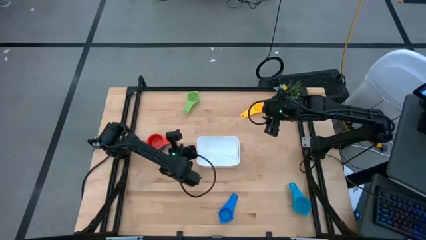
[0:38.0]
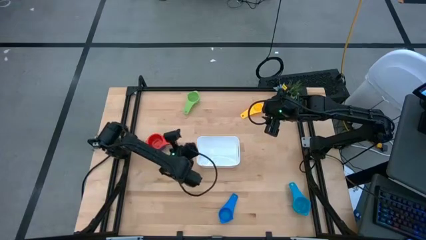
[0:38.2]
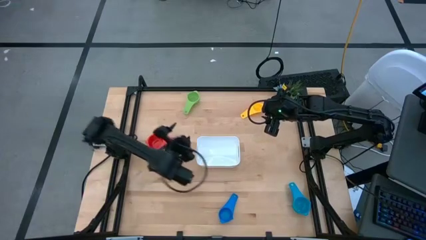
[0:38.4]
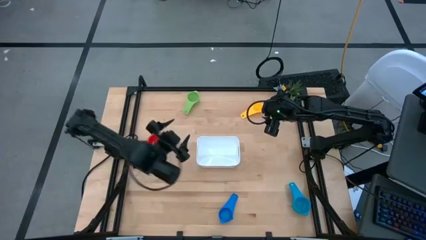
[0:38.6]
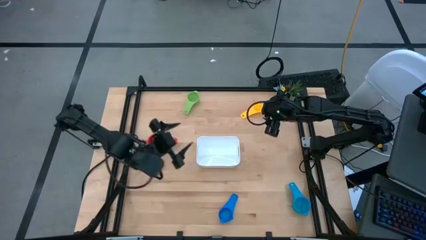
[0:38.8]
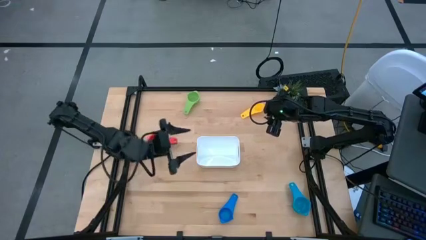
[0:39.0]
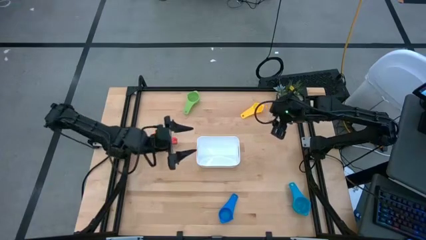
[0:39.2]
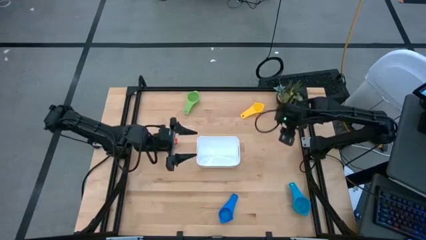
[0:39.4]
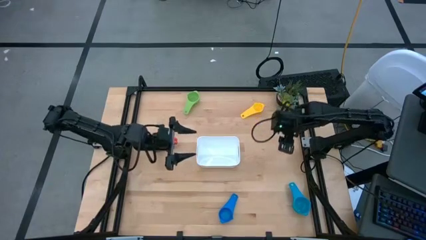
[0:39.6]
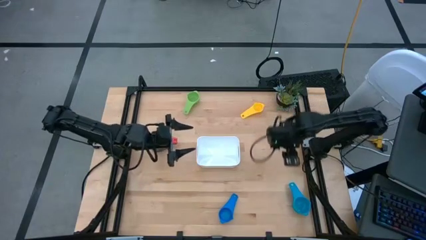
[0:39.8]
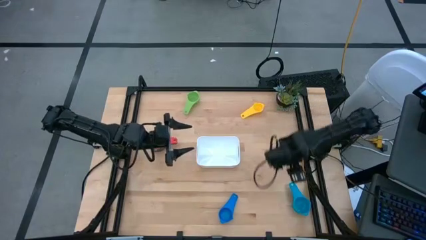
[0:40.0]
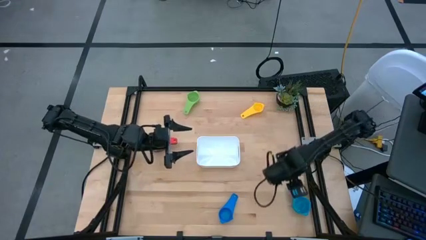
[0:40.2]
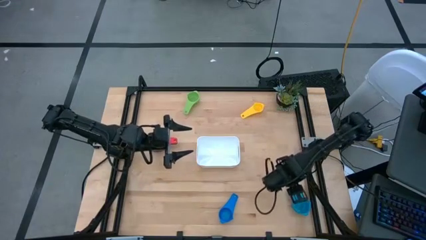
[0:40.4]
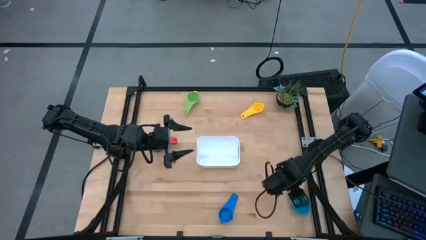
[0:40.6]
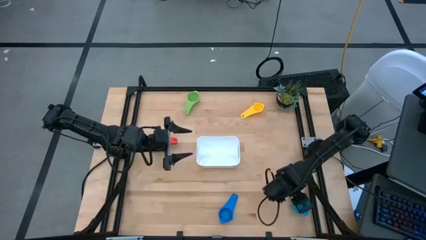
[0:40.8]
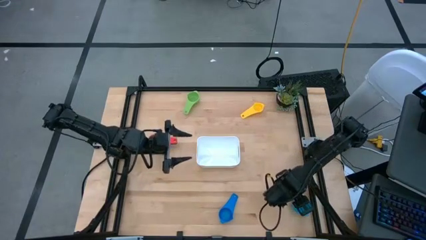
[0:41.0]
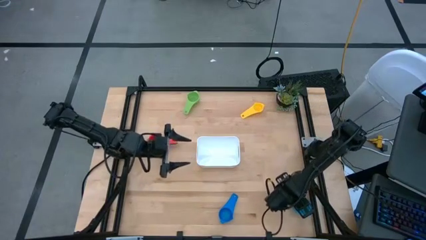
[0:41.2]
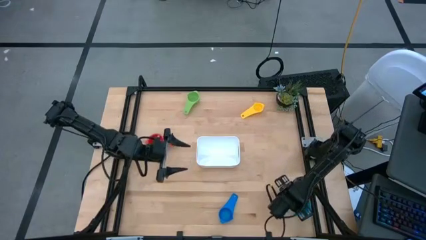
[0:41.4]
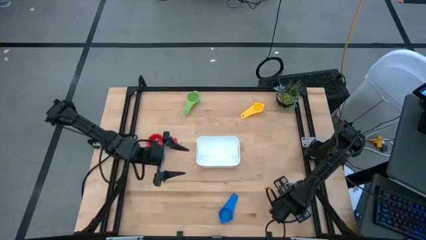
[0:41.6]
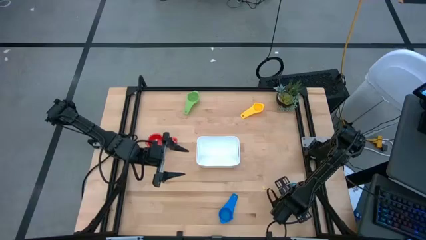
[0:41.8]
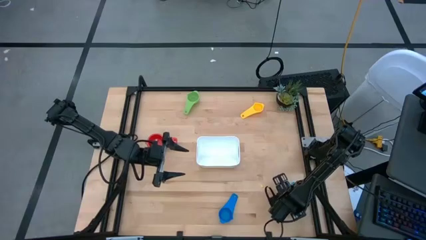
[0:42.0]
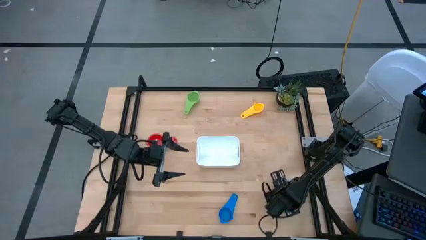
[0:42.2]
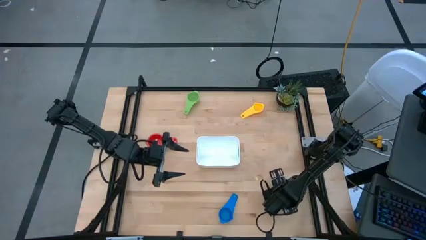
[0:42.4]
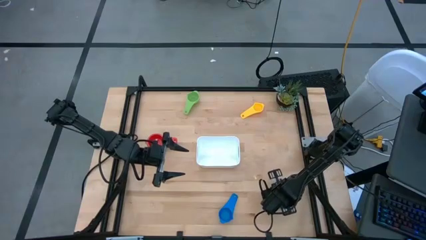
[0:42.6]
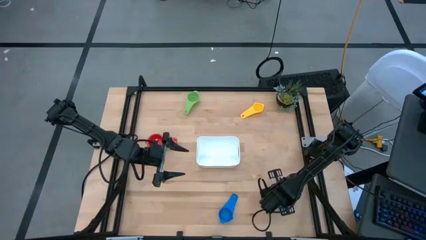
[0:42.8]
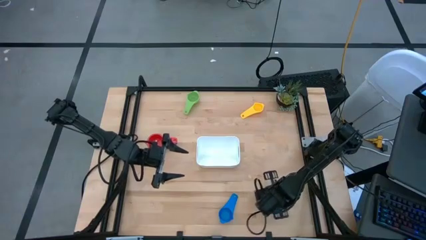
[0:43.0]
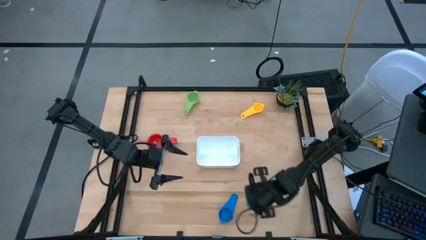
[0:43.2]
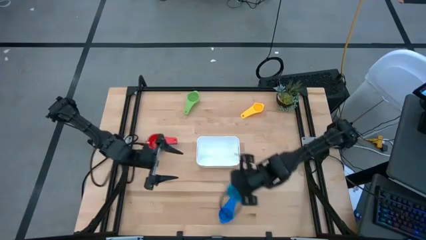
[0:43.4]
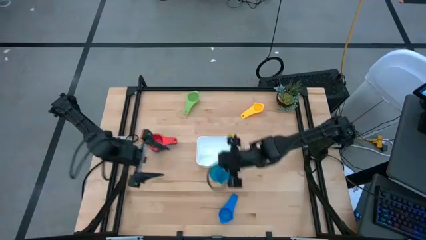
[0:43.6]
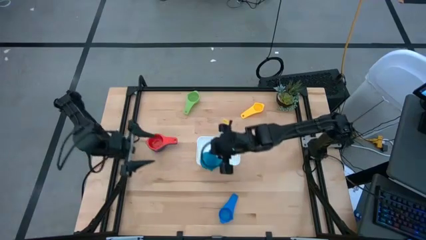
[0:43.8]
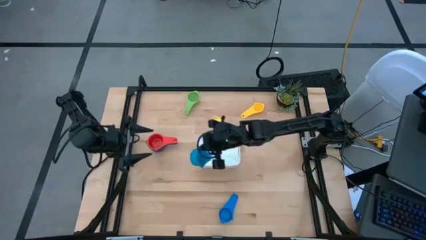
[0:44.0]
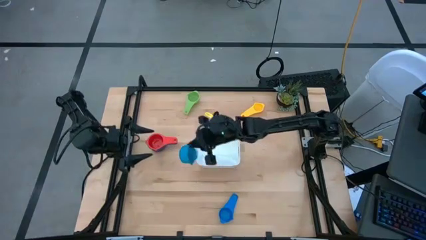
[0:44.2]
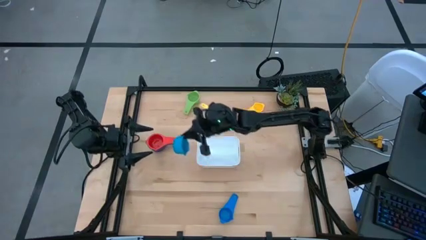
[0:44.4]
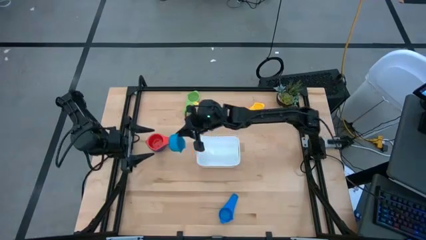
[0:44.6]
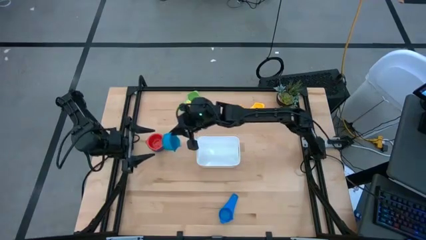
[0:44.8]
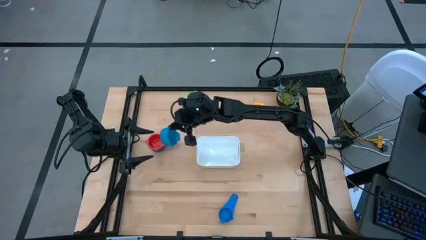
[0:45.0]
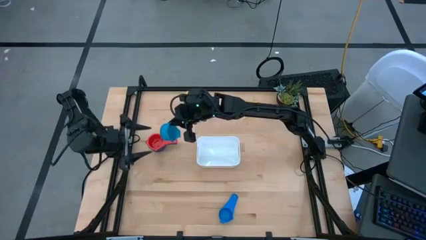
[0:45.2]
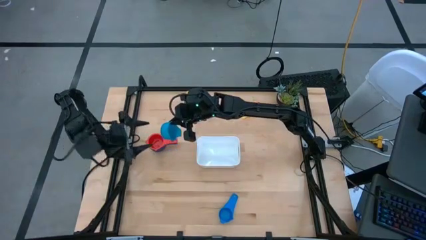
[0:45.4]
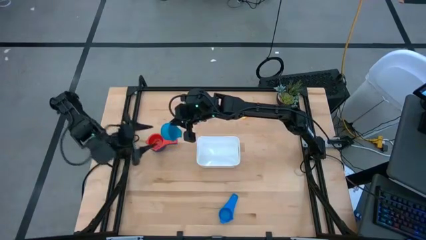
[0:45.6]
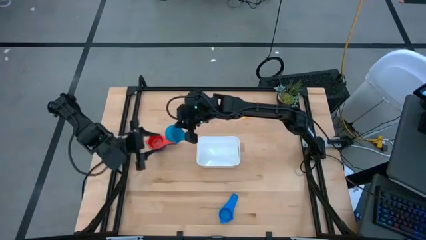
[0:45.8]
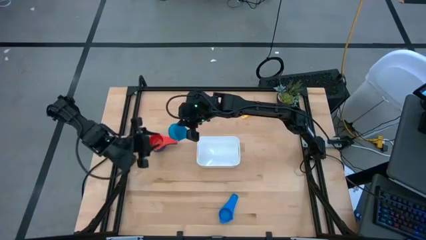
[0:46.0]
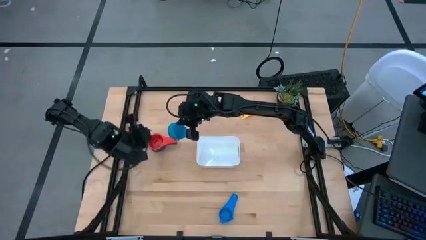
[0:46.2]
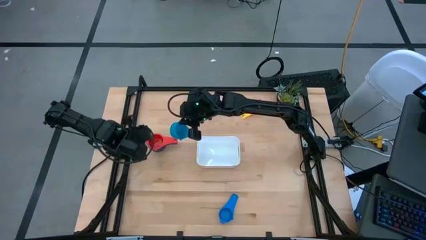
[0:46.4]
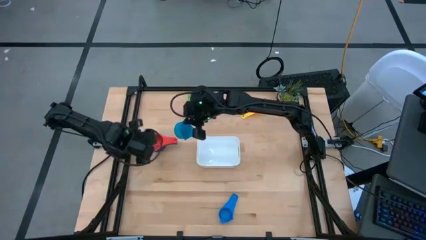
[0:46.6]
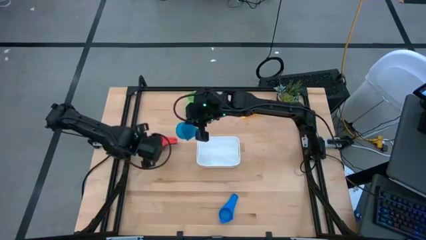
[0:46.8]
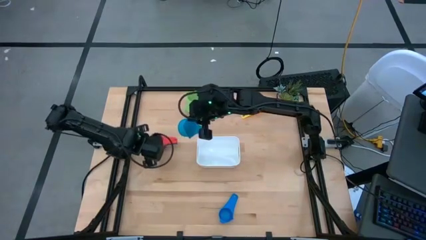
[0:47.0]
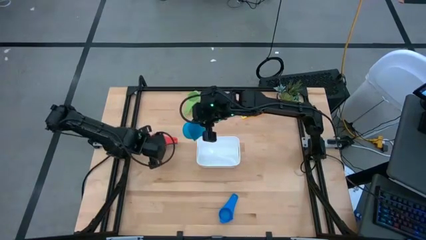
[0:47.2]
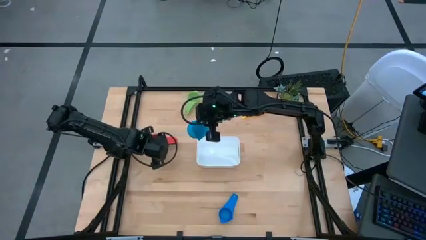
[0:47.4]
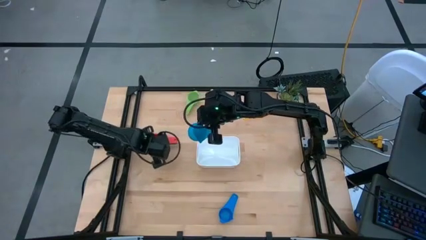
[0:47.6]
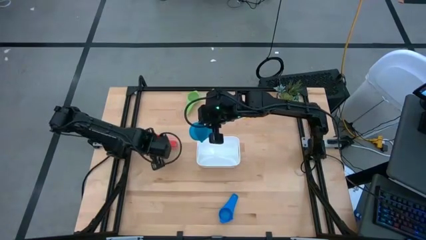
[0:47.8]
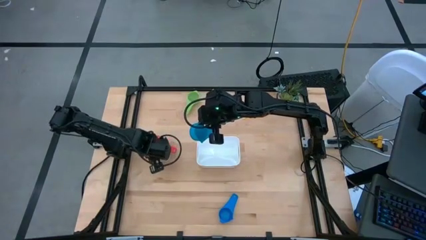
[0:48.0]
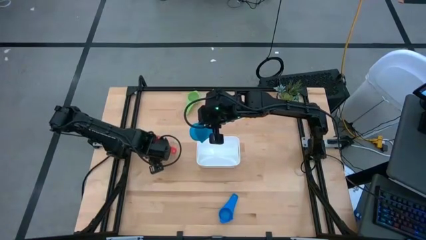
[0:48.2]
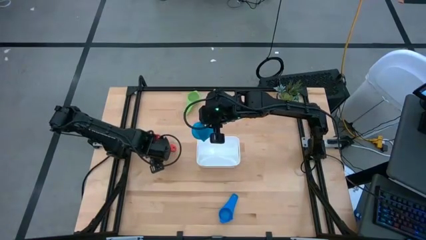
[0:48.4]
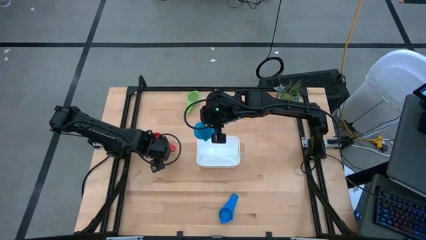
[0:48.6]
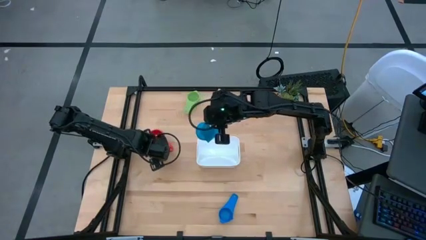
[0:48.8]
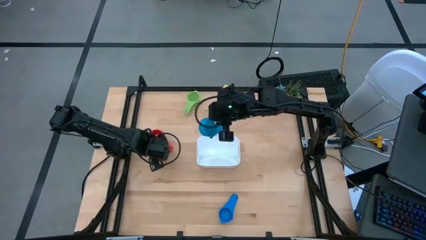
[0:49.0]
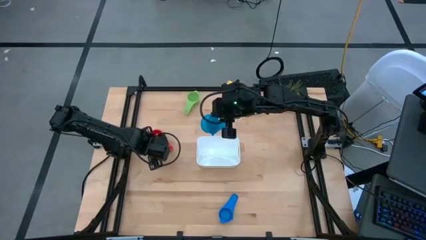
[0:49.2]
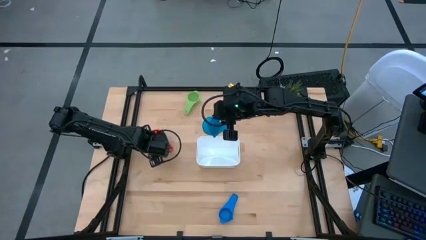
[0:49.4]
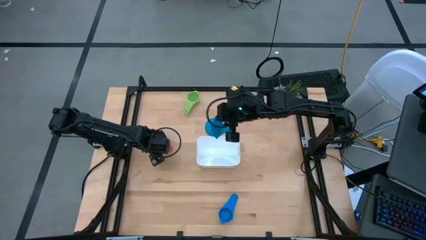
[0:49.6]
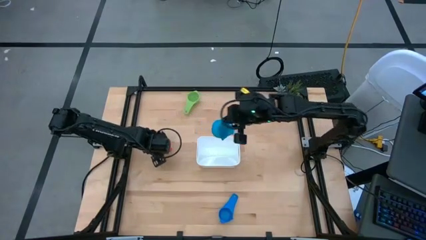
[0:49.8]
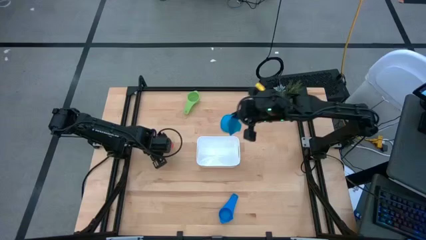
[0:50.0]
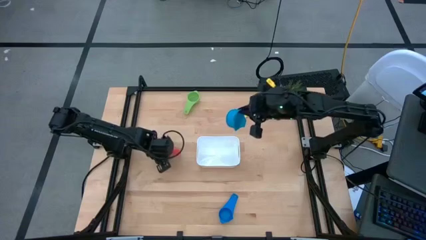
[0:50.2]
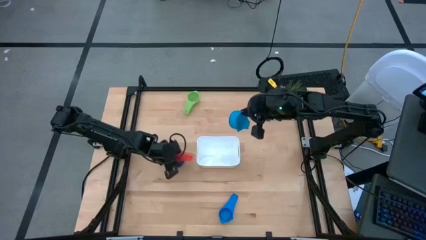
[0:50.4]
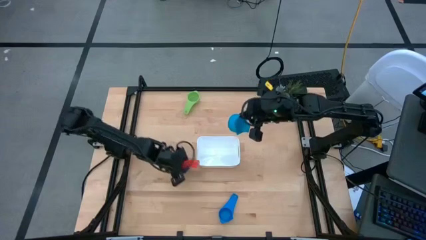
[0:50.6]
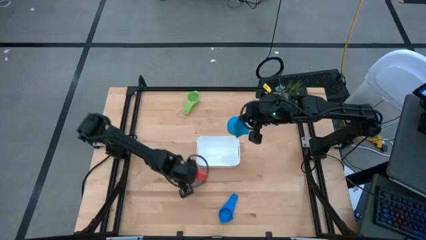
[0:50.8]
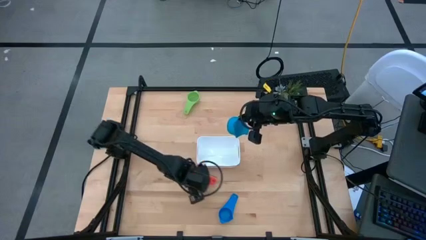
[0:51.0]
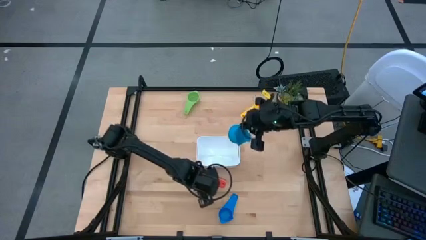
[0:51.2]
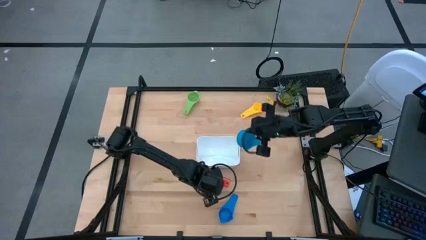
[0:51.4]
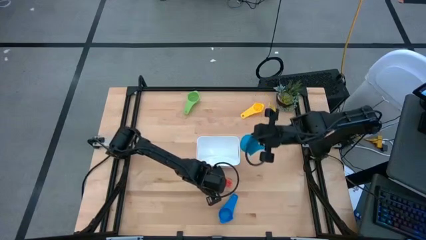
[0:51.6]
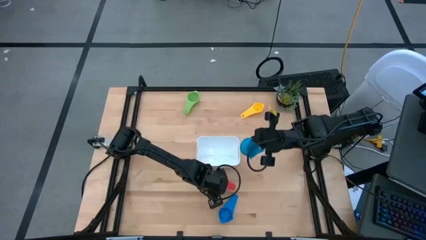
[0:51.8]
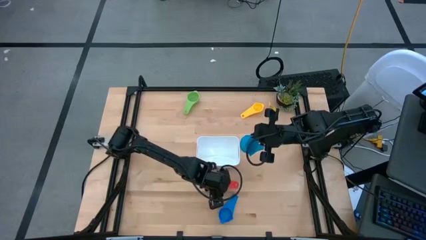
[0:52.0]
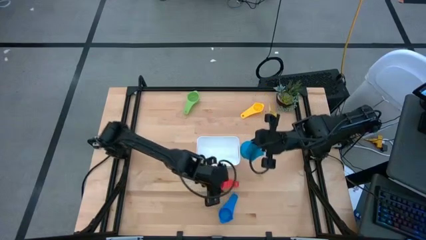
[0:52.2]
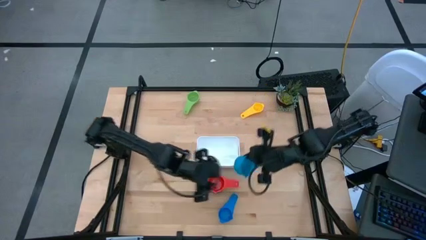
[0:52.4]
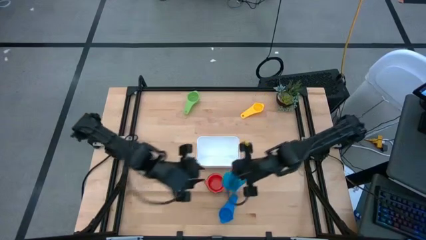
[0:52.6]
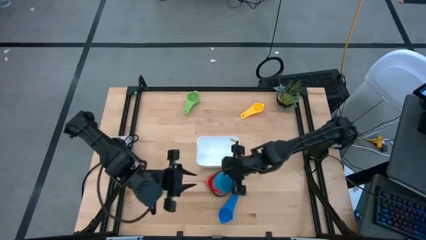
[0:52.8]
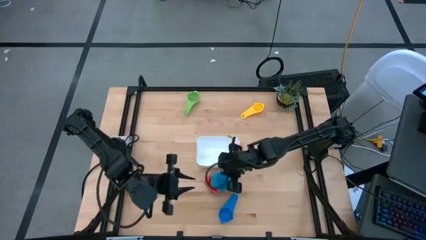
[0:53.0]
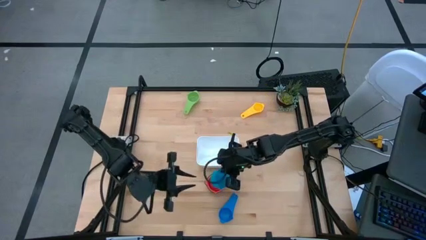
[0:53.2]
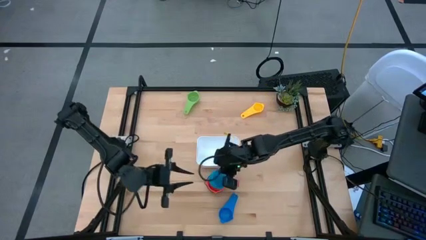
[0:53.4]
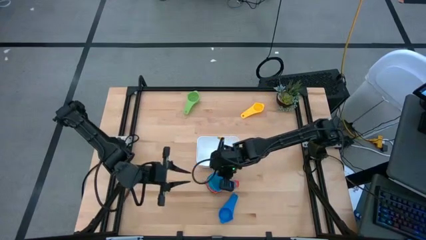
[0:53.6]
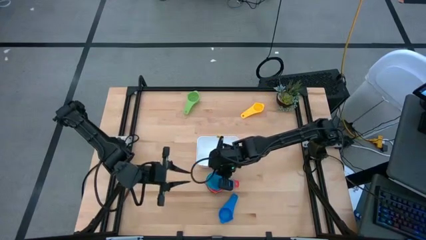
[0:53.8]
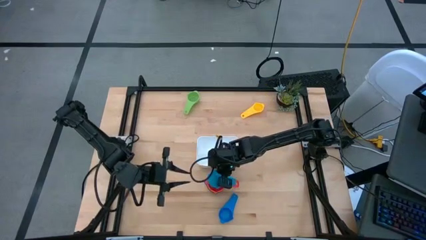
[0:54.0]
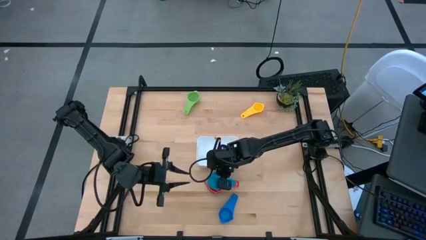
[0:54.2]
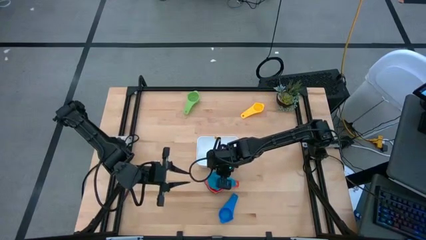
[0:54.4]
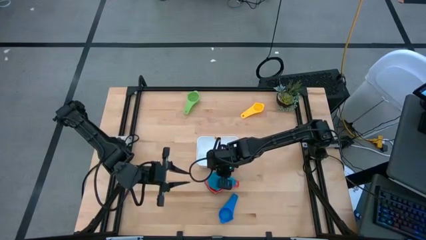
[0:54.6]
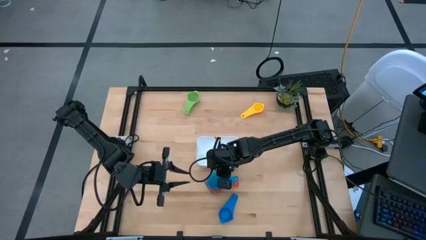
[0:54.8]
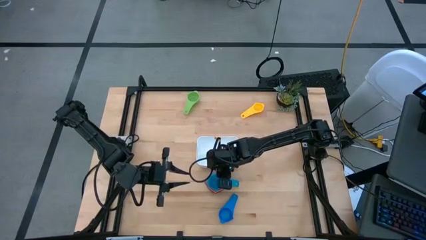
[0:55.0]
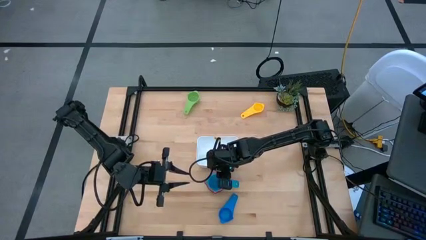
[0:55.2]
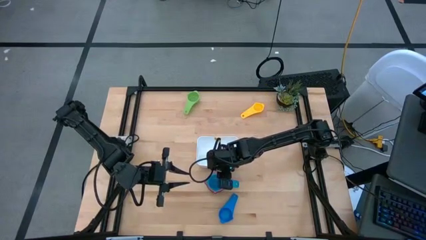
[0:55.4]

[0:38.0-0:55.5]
Task: Nest measuring cups in basket
Stack the the right blue measuring cup on top of the stacked measuring cups
